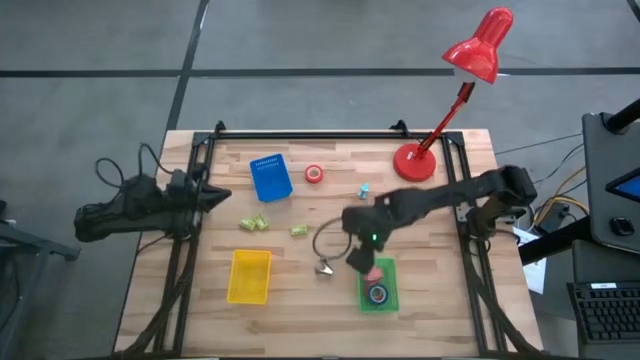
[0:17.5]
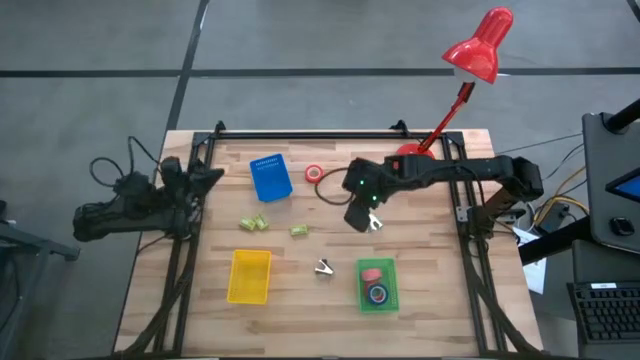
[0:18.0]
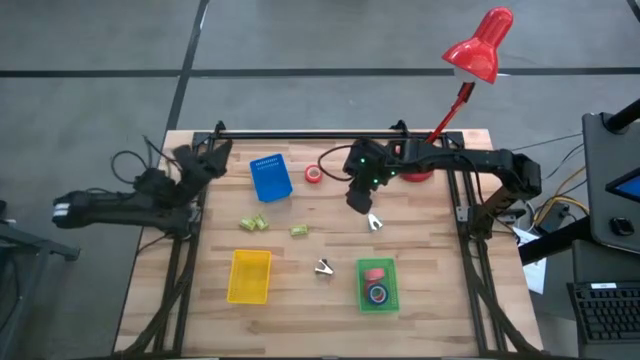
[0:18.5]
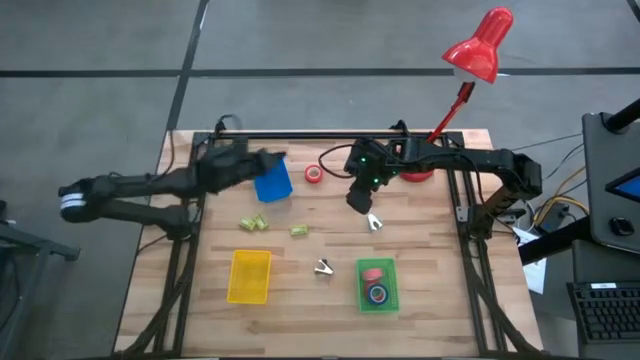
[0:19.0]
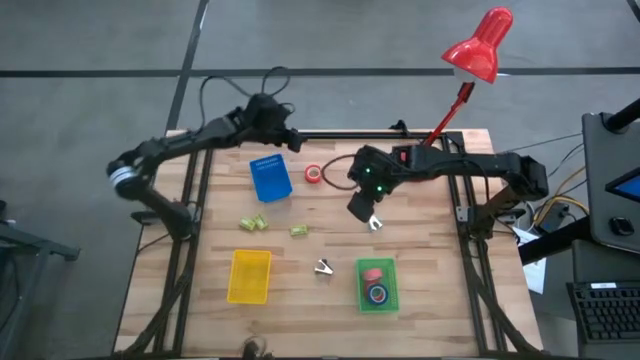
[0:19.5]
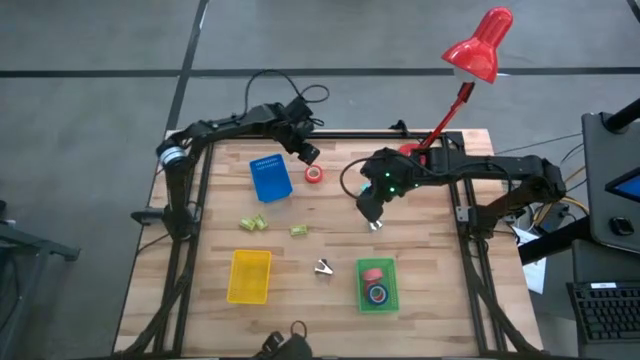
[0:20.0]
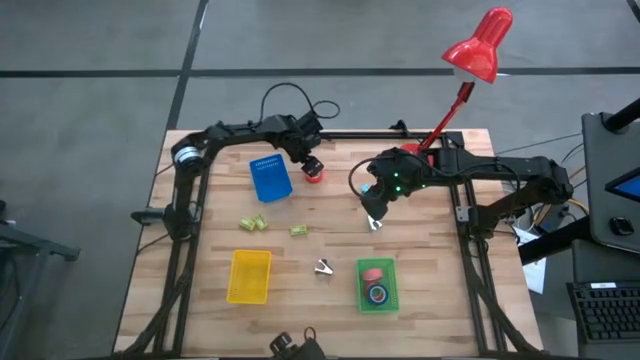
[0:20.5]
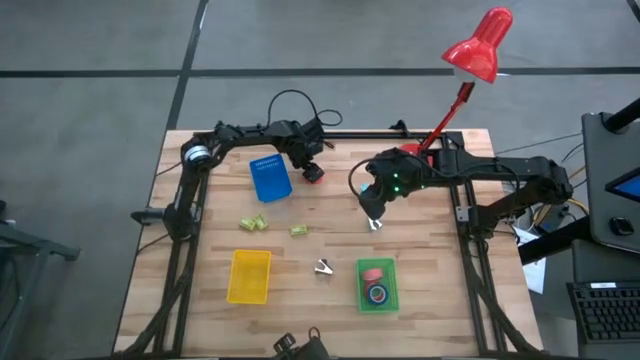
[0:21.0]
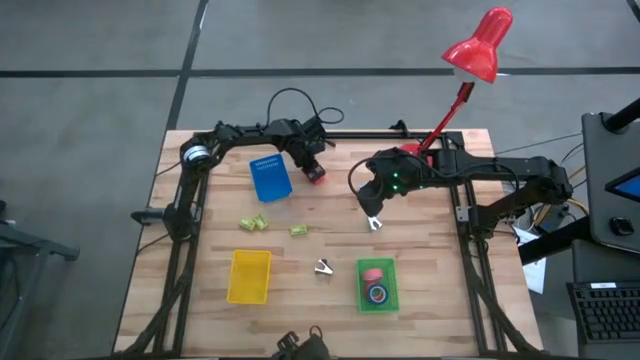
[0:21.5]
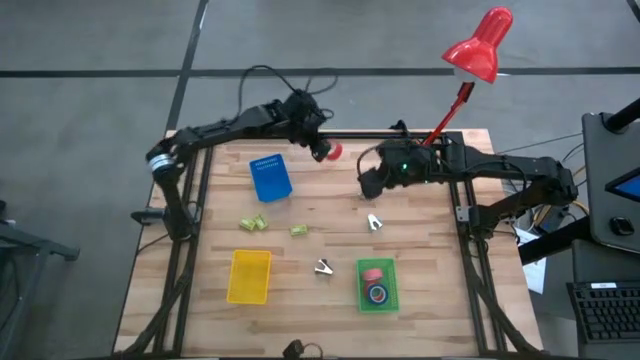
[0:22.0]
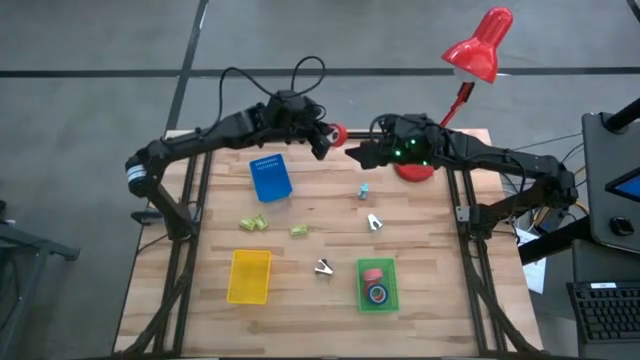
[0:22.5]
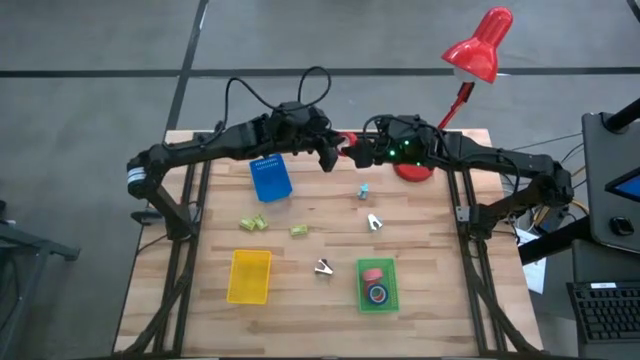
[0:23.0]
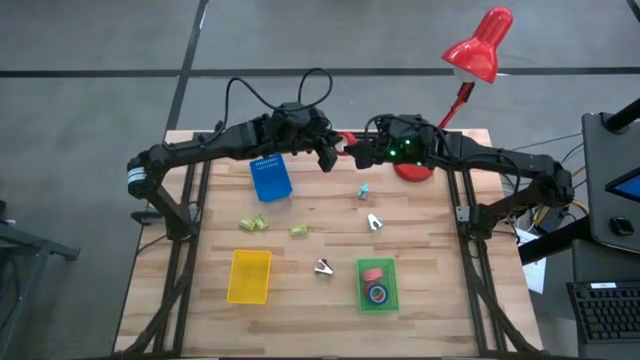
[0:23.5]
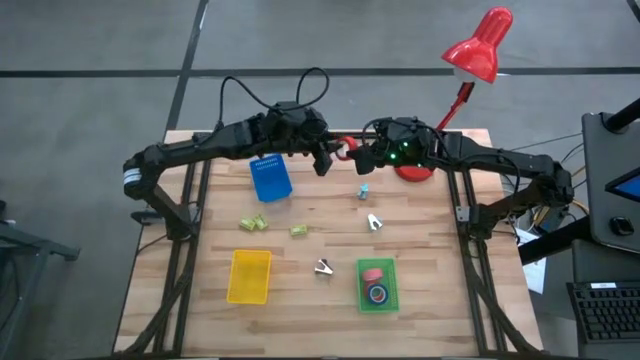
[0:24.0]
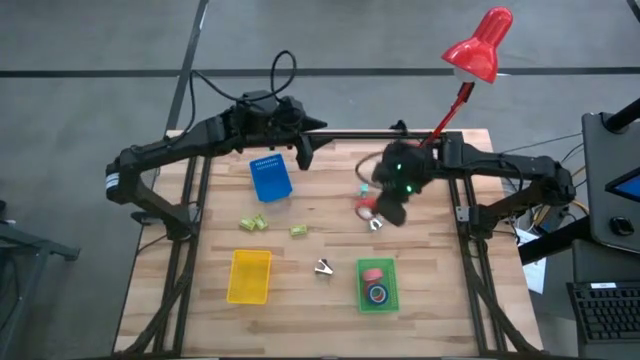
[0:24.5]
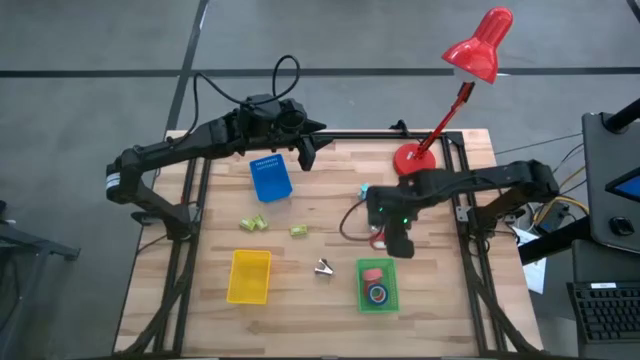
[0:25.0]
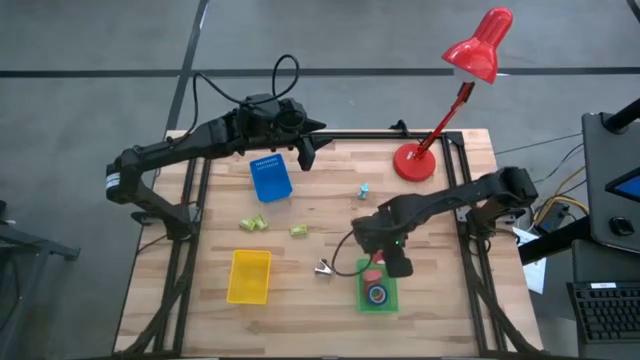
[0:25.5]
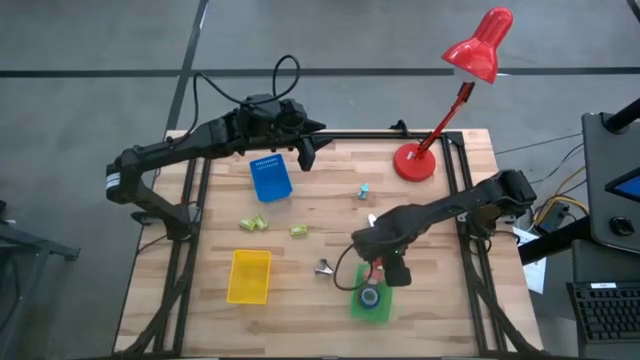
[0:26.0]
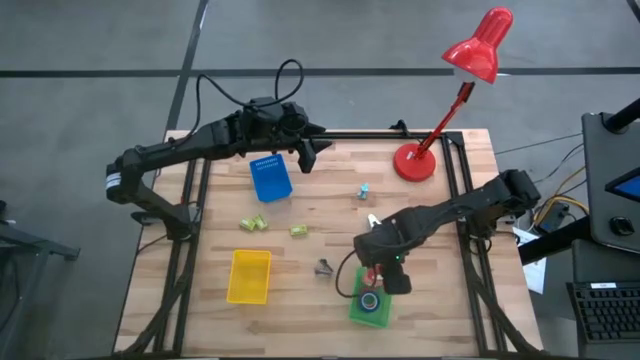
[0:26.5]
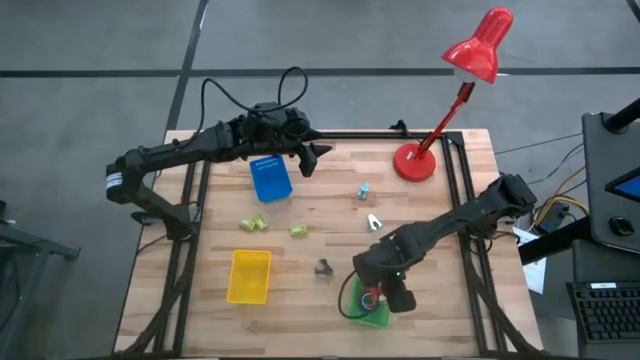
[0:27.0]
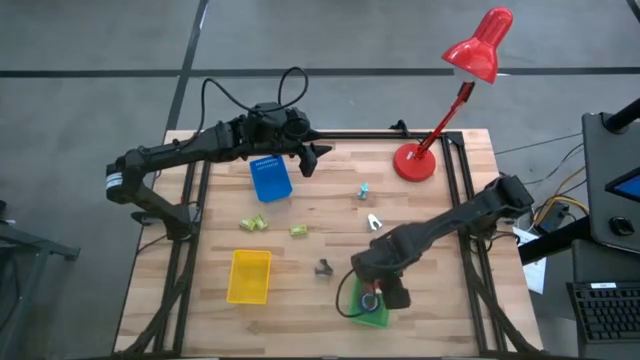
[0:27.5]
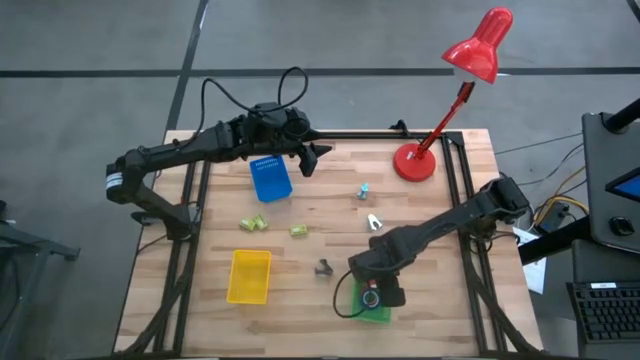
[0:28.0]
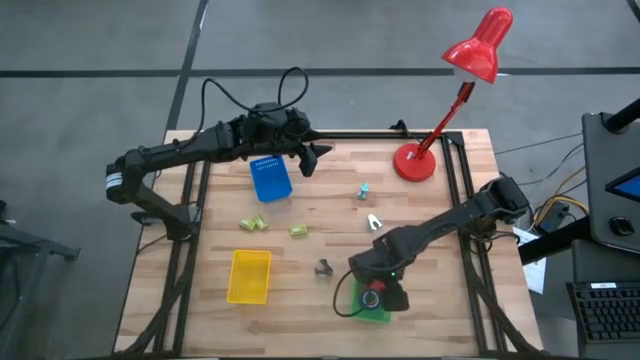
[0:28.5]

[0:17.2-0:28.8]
Task: Pick and place Stapler, Stapler remover, tape
Put the orange electrical tape into the green bin

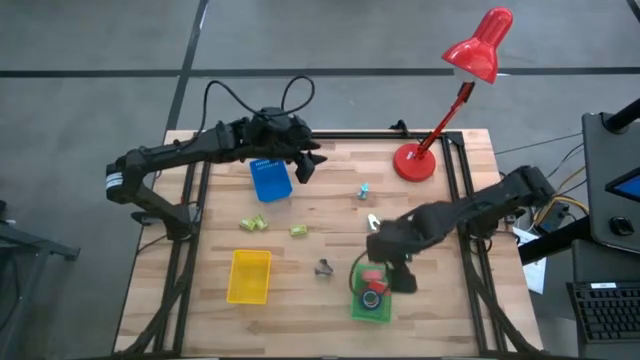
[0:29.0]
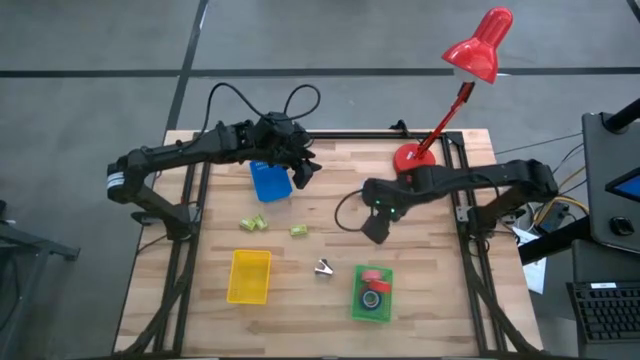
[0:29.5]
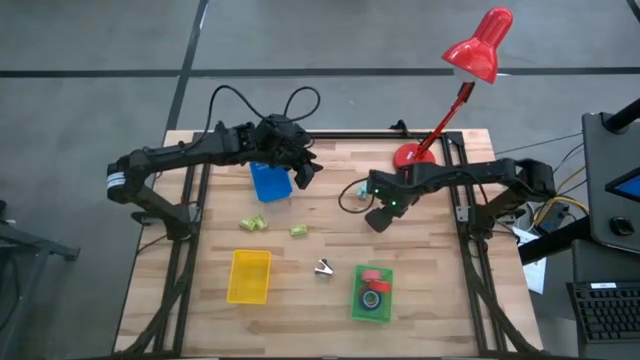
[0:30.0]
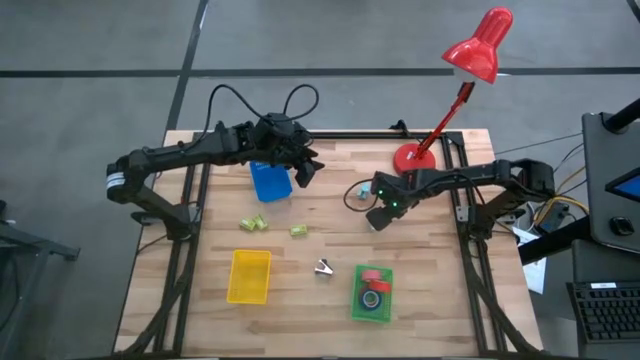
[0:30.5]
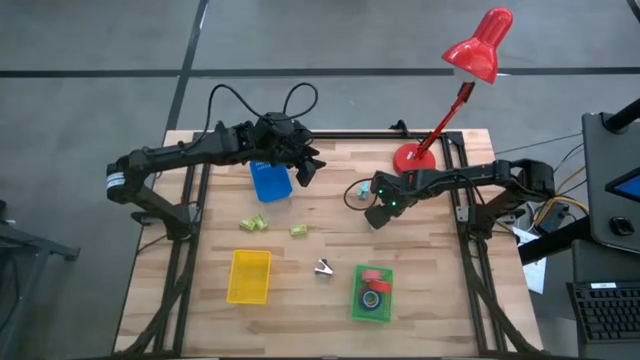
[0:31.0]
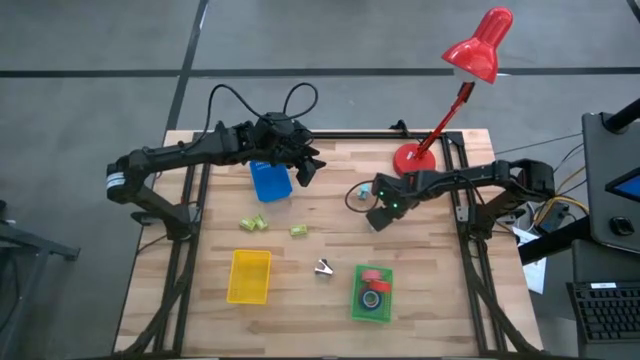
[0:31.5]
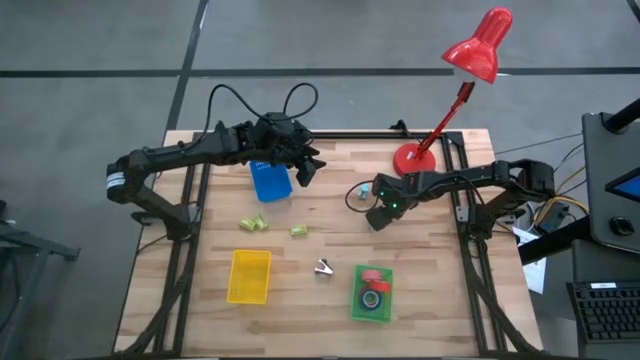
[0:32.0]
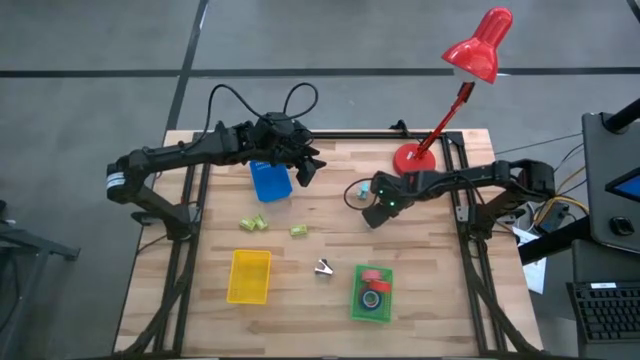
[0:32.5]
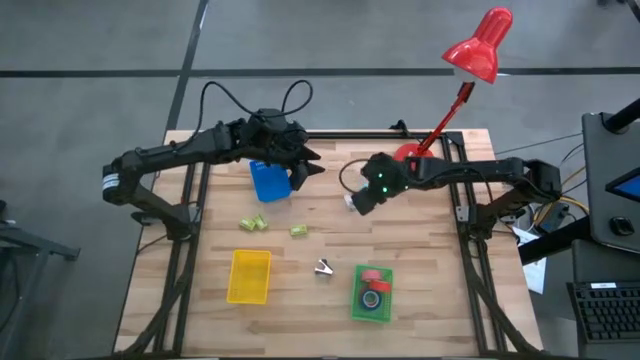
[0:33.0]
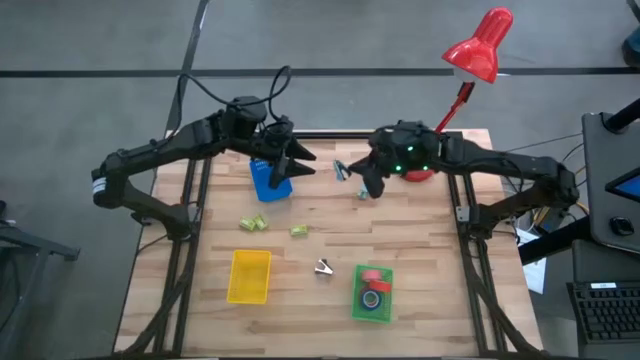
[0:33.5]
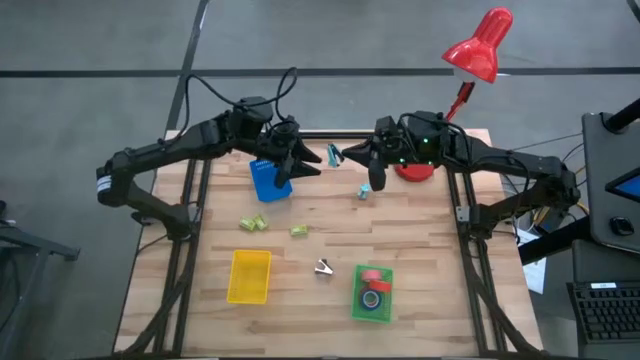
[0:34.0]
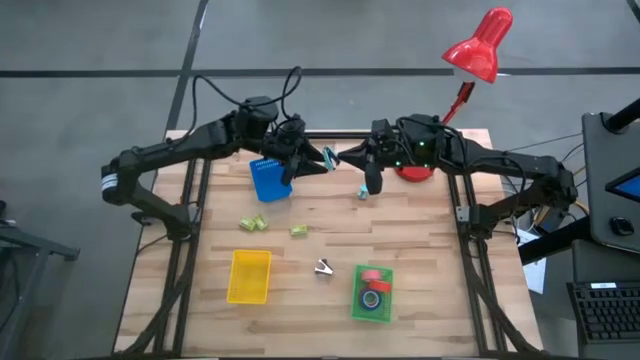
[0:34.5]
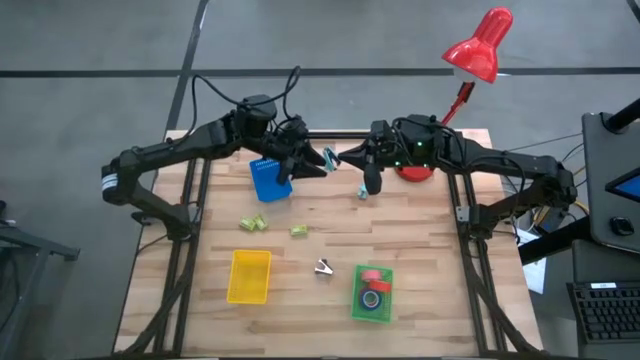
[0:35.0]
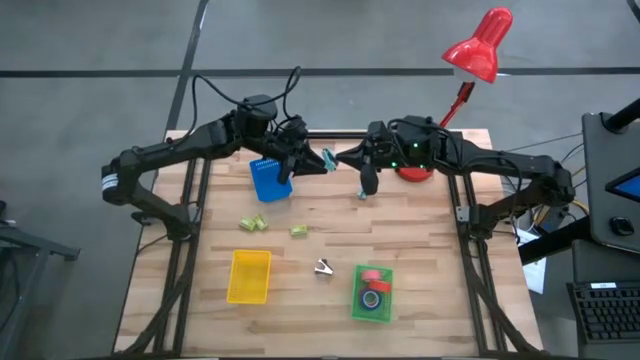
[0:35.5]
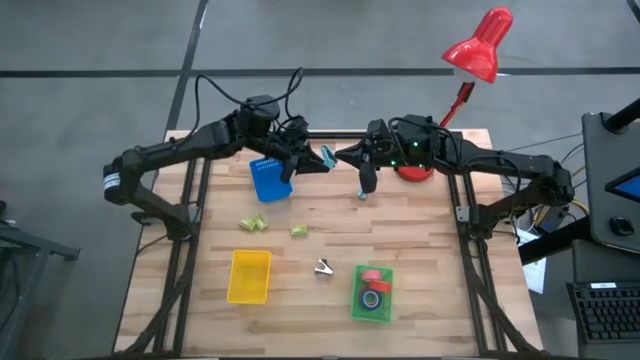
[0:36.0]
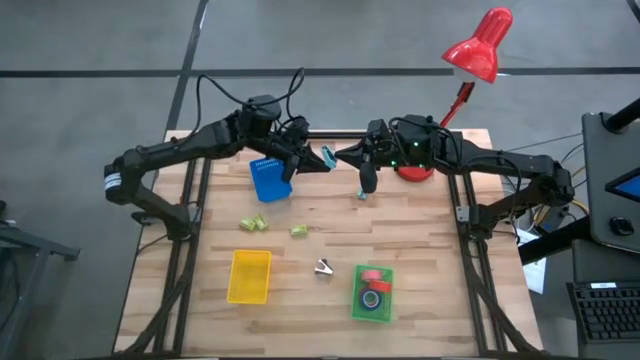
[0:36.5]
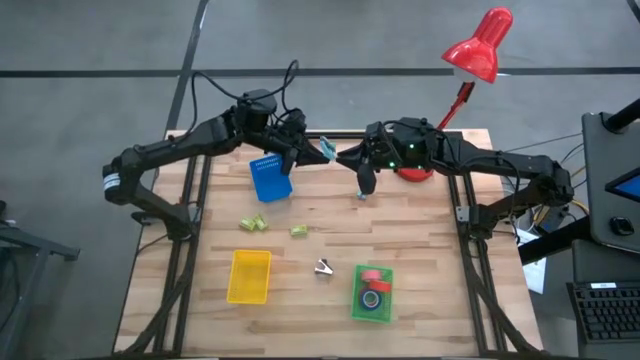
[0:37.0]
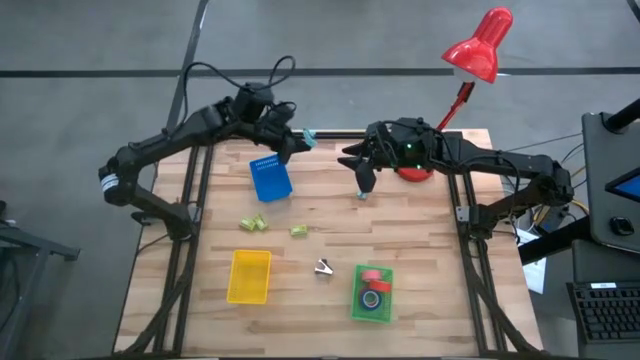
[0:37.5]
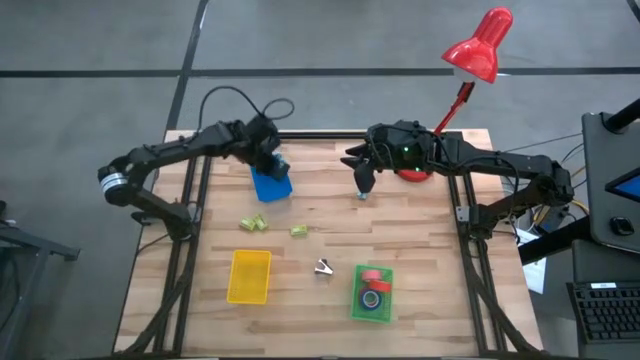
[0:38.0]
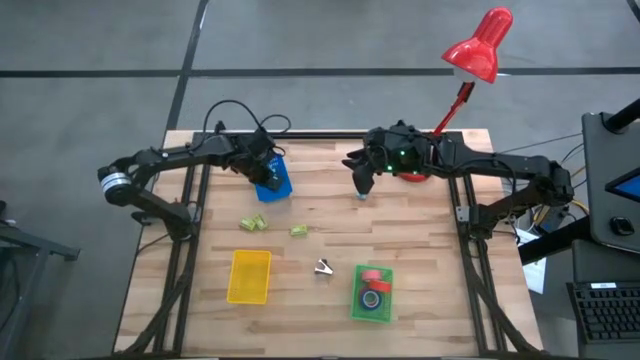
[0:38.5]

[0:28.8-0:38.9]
Put the bottom blue staple remover into the blue bin

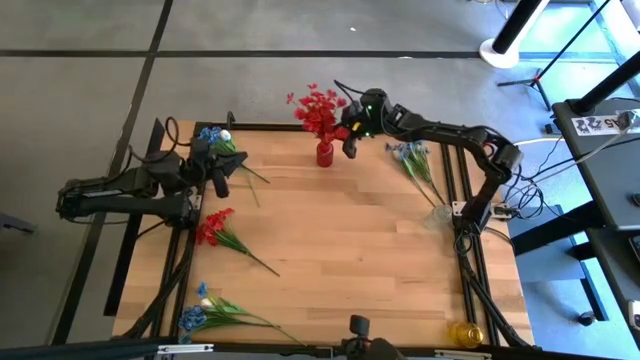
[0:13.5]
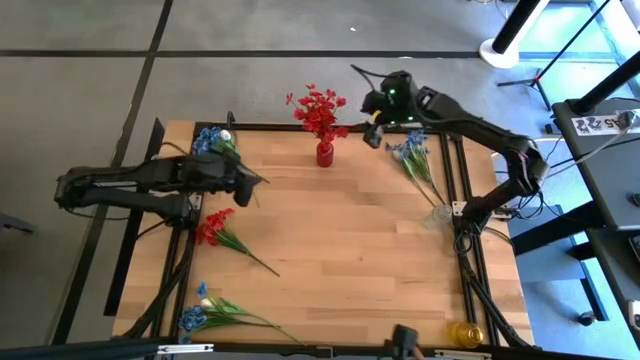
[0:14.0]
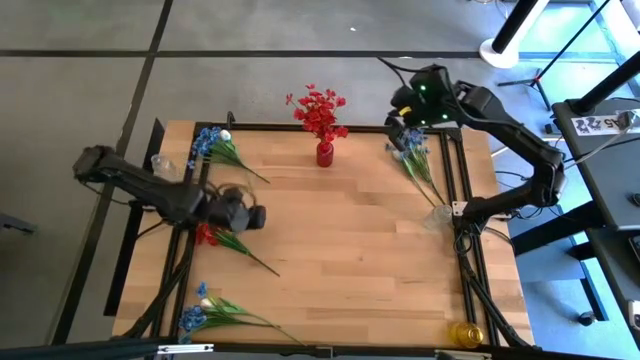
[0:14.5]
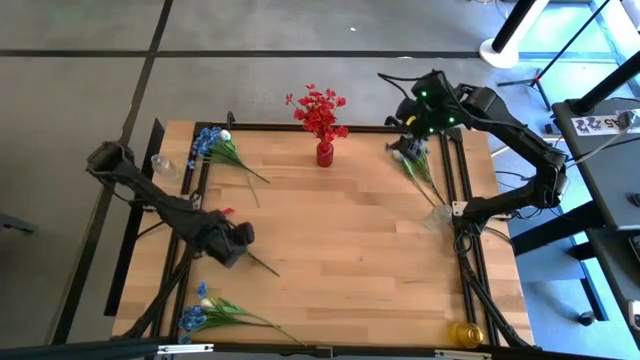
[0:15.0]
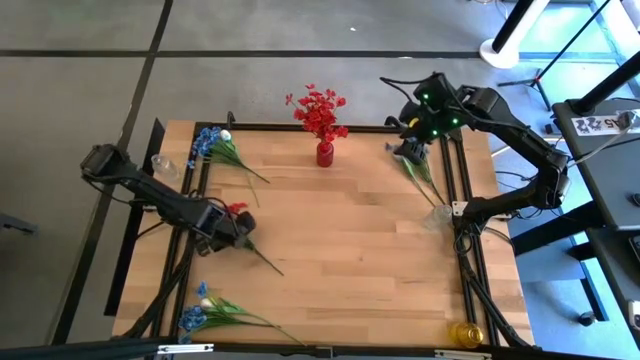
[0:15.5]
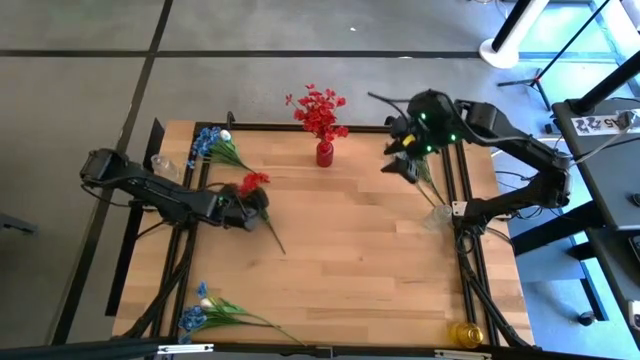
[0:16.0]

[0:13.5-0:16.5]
Task: Sort flowers into vase by color
Put the red flowers into the red vase
